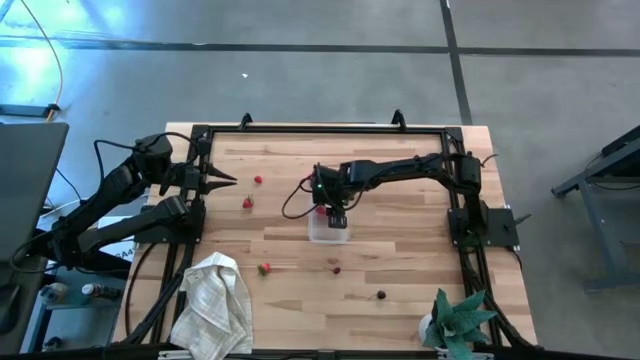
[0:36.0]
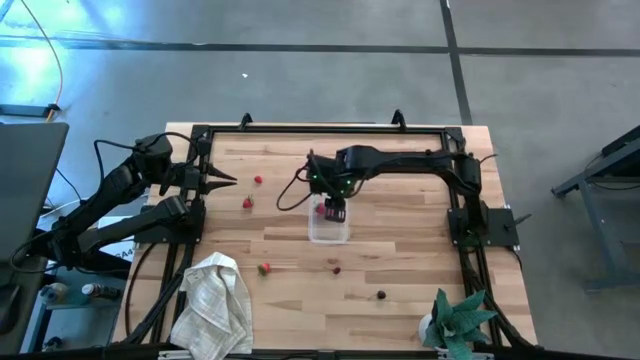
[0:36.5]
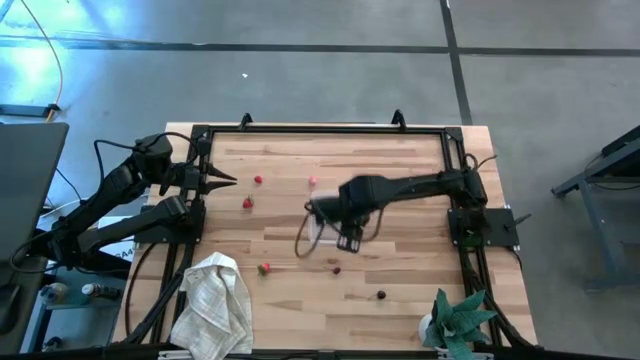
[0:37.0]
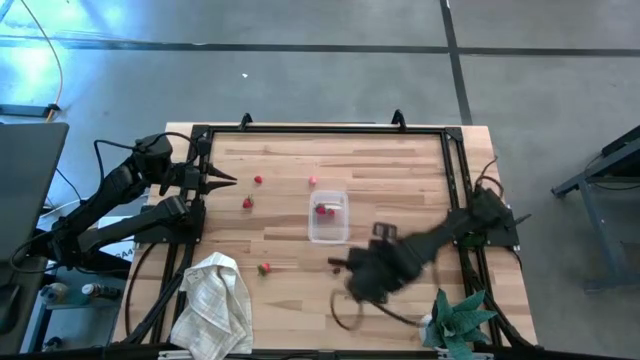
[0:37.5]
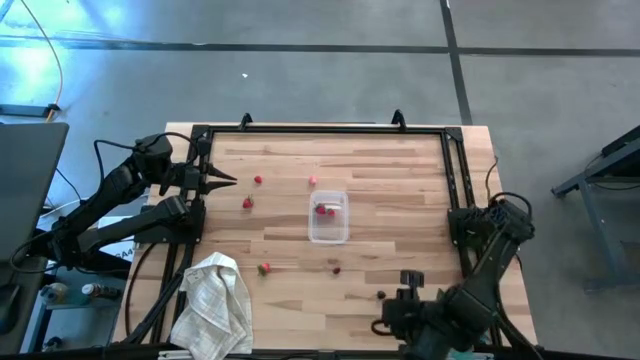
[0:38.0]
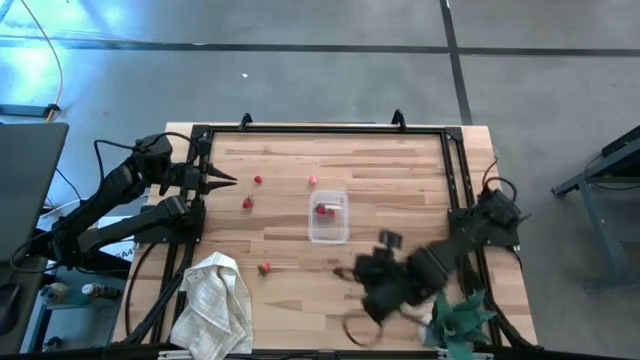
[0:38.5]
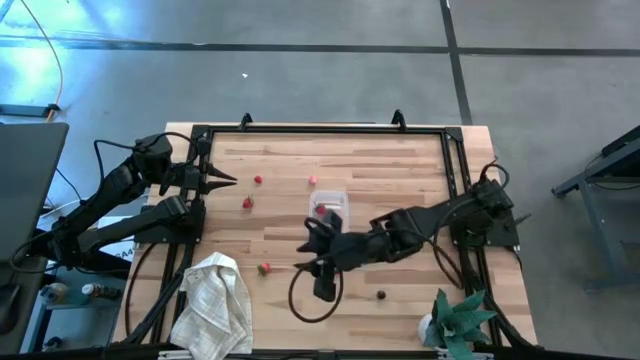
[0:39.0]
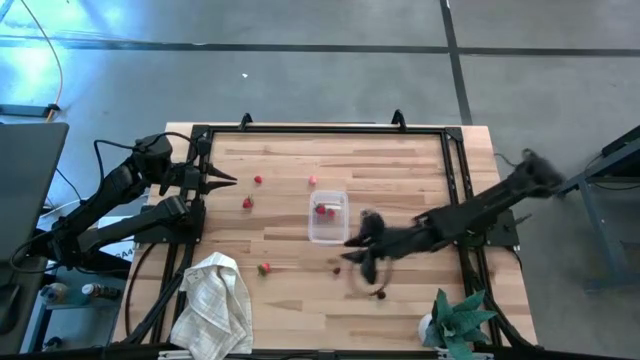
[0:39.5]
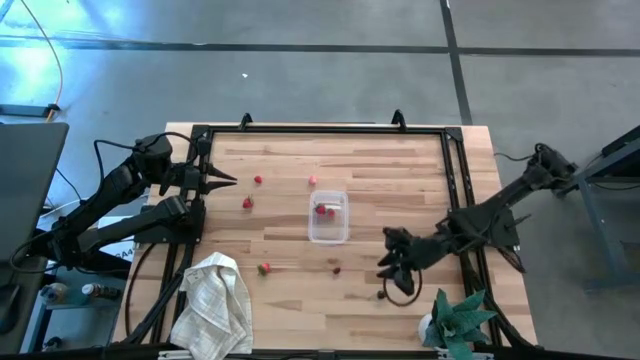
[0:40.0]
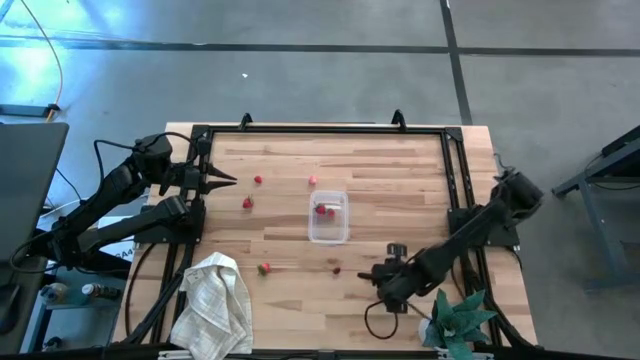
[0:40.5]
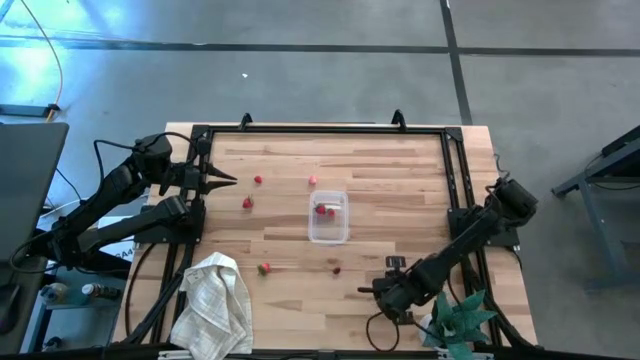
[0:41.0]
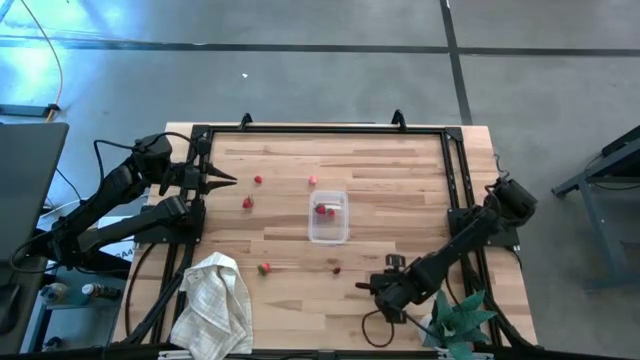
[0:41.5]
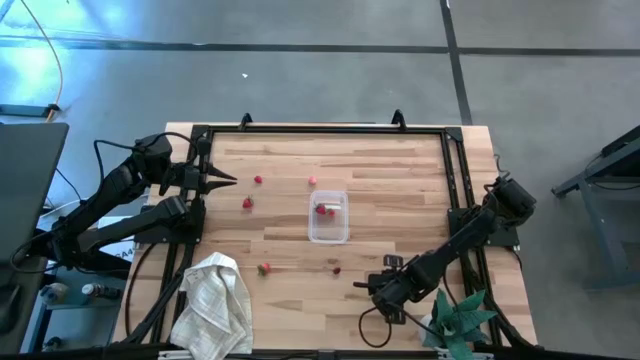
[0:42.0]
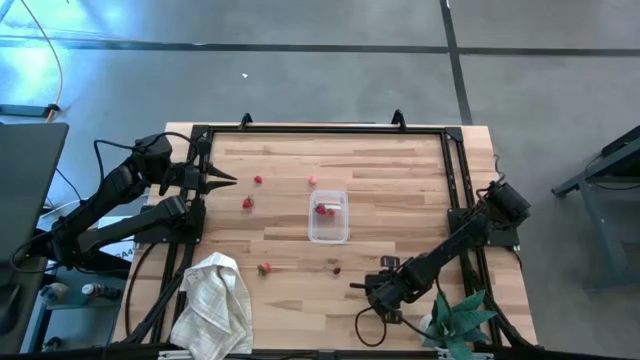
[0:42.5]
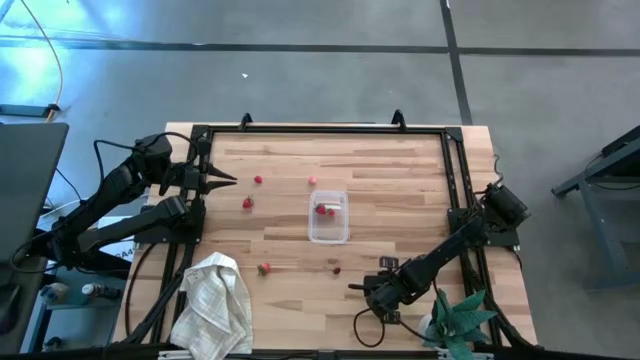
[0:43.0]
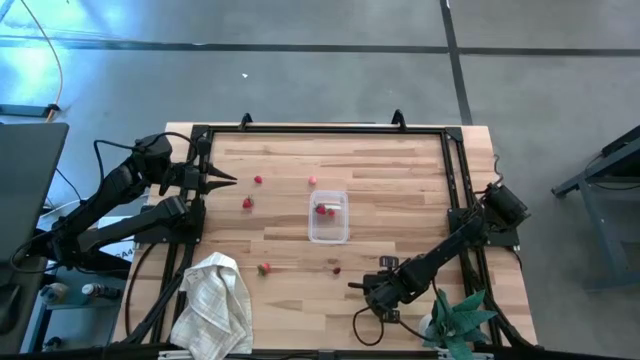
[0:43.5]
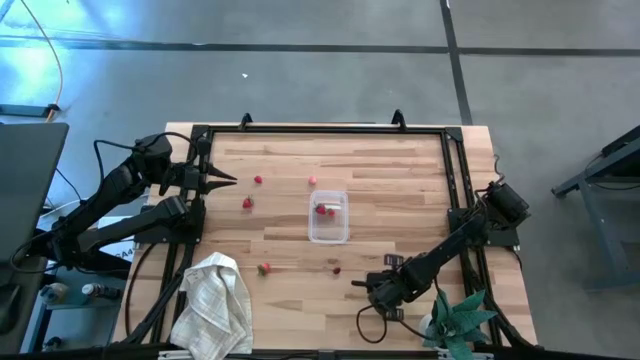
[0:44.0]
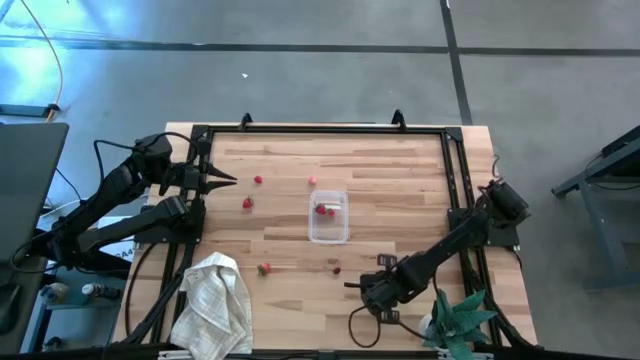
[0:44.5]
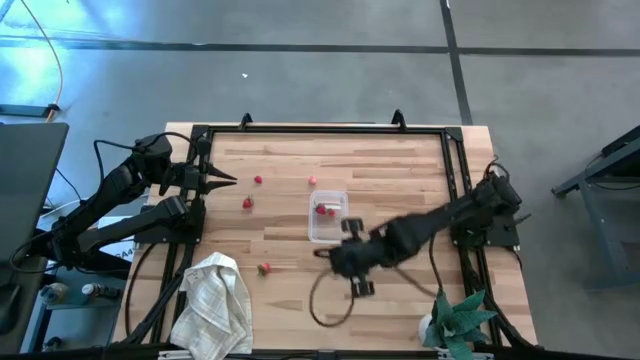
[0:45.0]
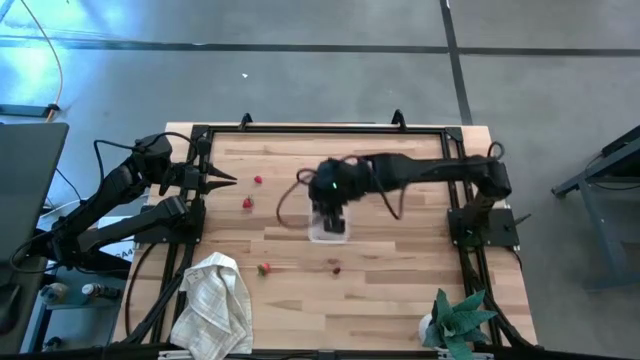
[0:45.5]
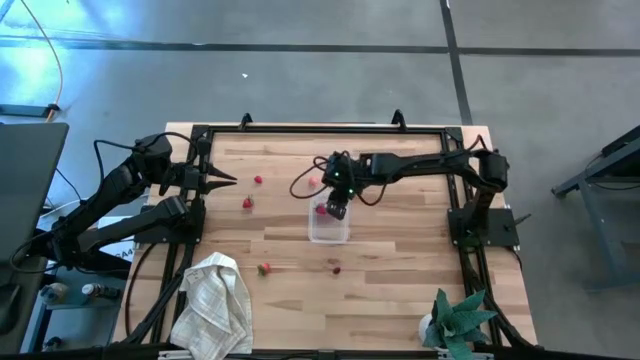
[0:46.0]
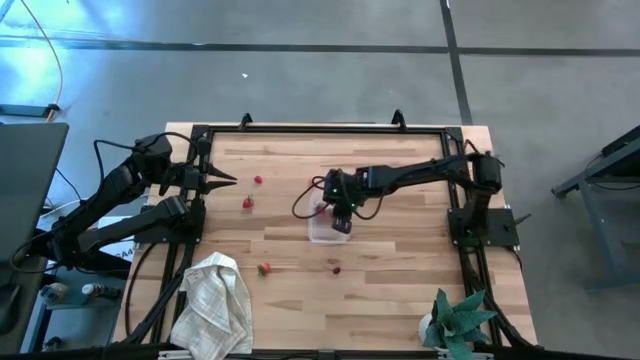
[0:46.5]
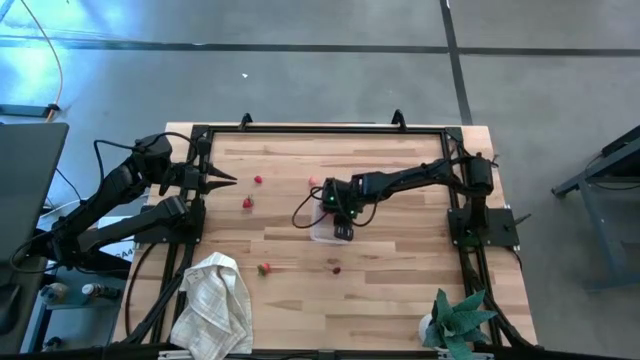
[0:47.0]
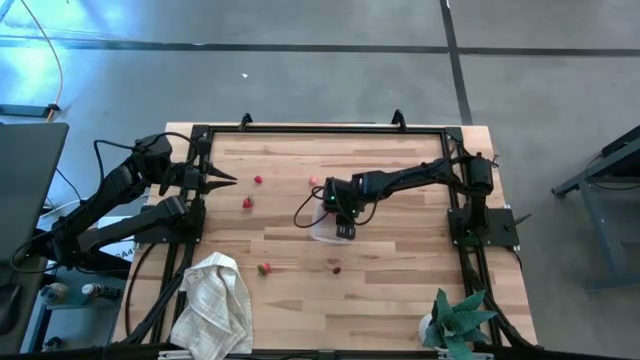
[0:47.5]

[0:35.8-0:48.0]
Task: Pick and placing Produce into tupperware
Put the black cherry into the transparent bin

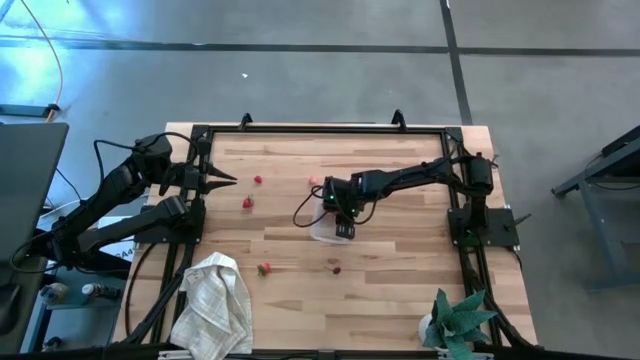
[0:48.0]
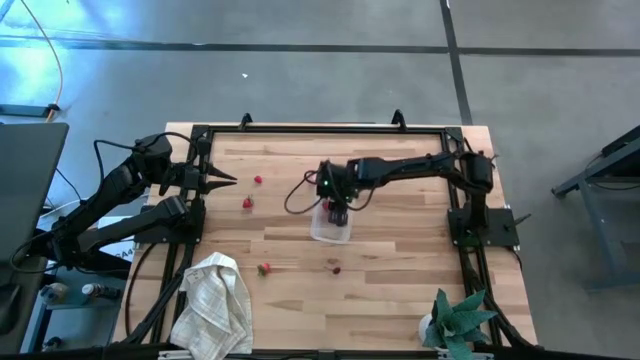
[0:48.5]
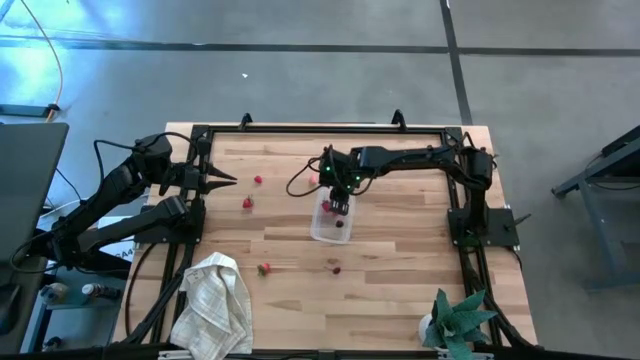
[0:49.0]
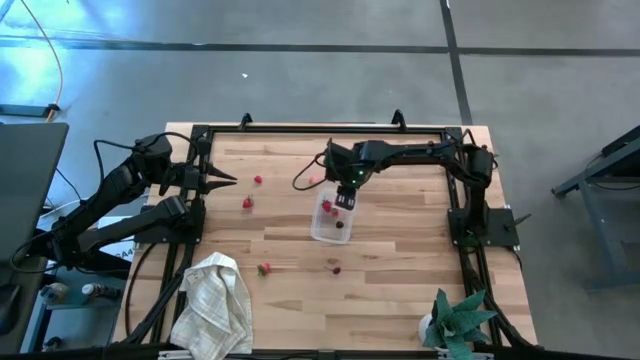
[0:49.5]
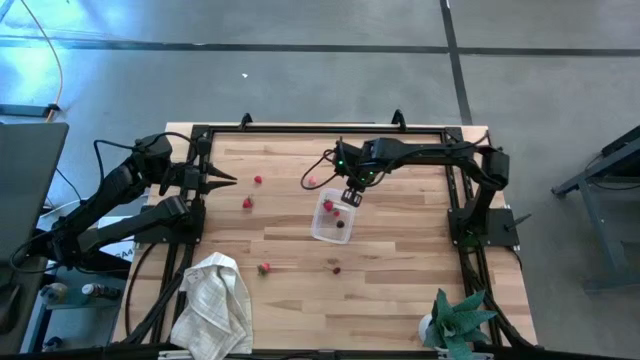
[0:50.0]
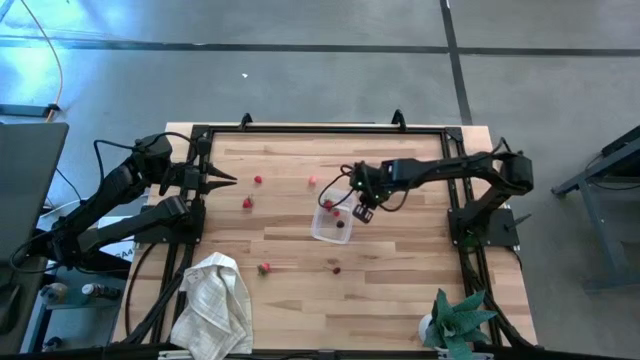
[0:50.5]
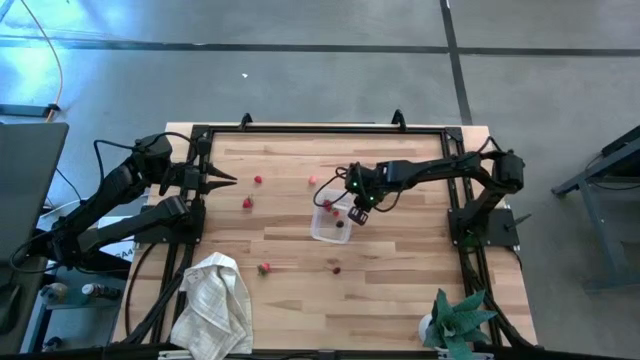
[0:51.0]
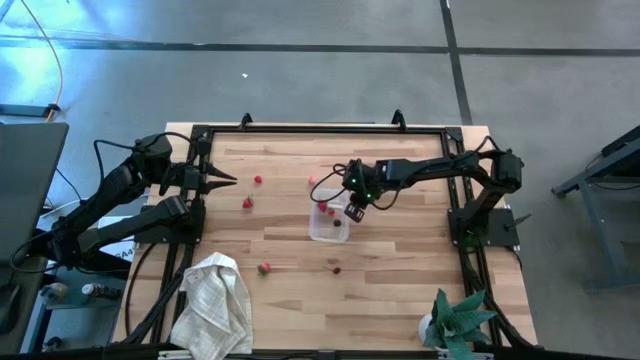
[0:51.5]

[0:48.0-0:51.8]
Adjust the transparent bin

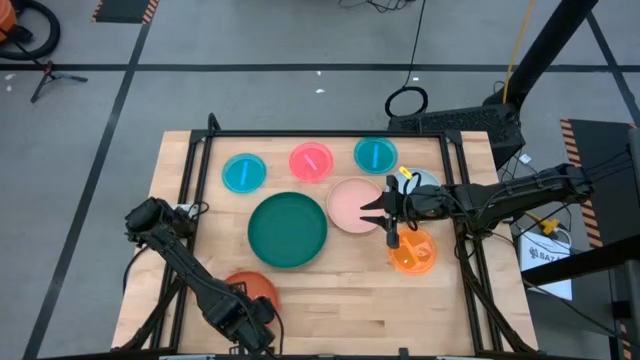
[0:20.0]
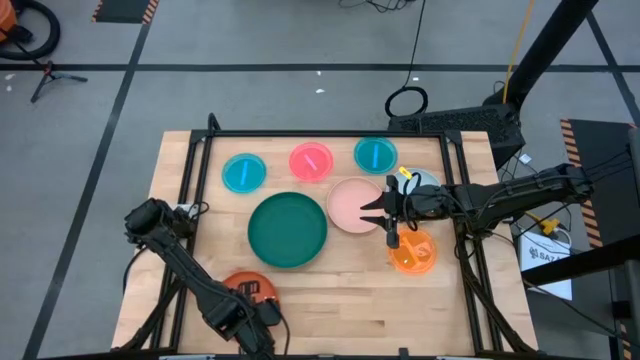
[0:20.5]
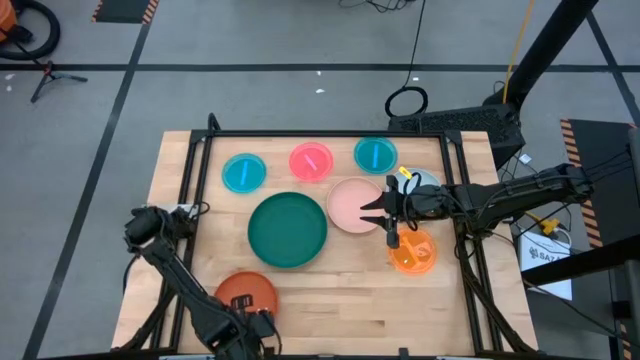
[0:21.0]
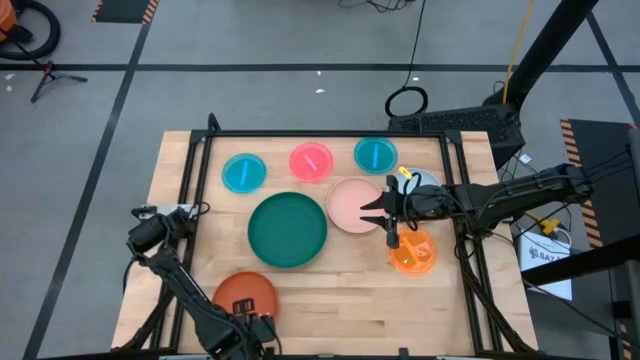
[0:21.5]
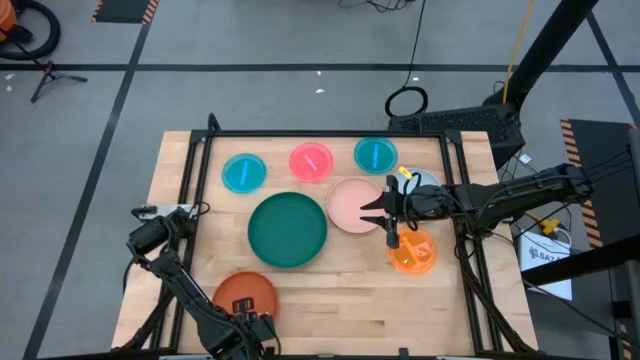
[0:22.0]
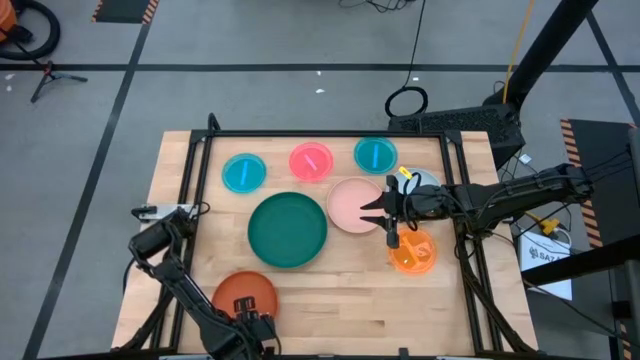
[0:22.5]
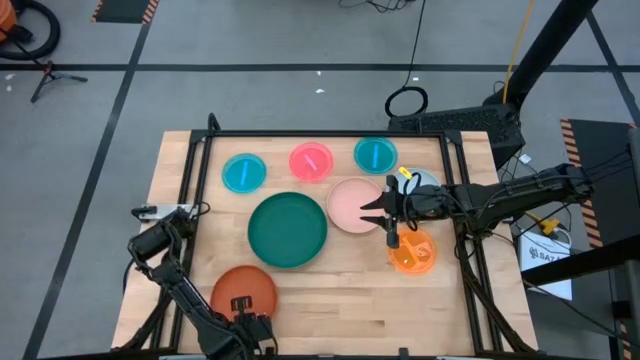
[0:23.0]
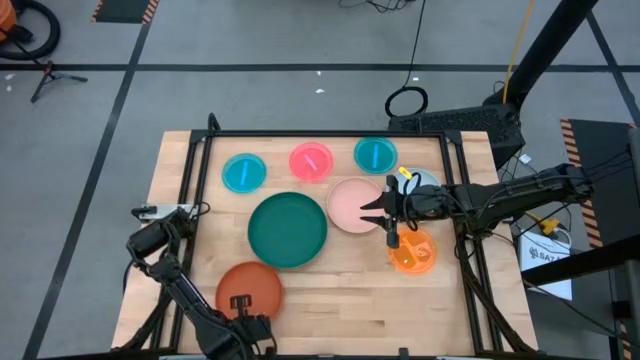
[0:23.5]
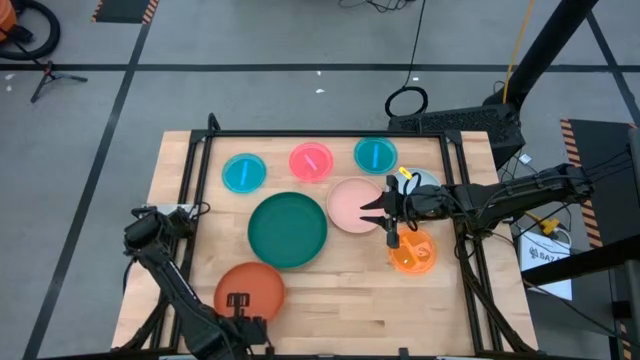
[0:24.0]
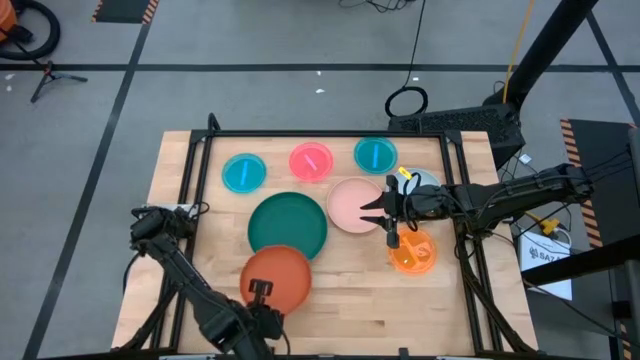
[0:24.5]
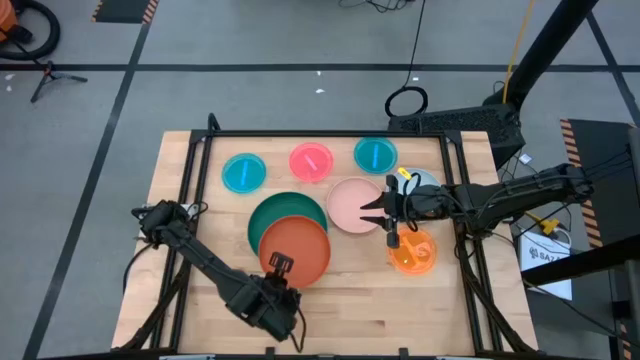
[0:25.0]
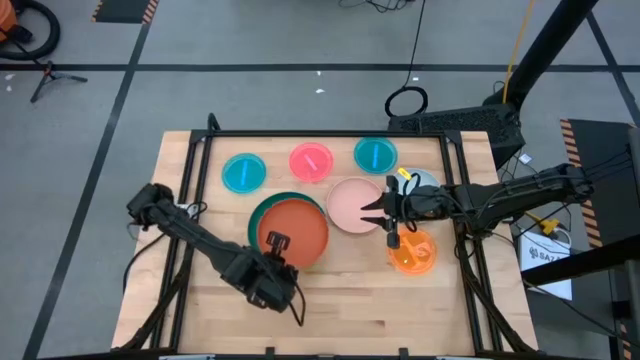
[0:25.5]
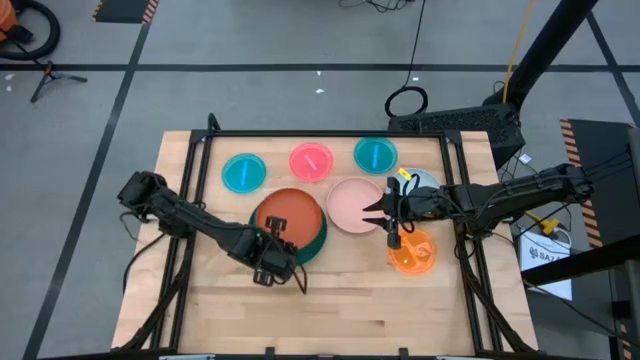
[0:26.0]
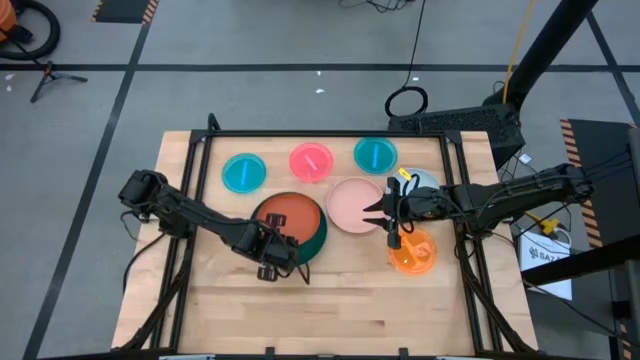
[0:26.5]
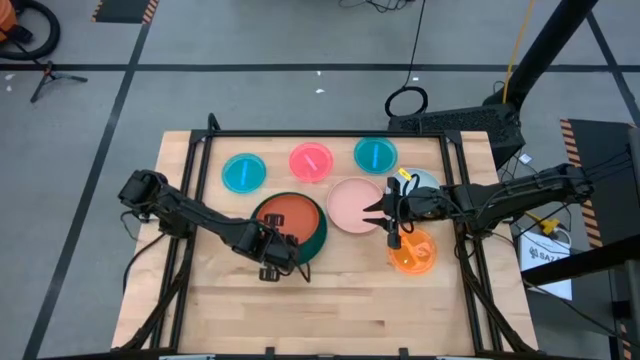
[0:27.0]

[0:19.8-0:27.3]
Task: Stack plastic plates
Stack the orange plate on top of the dark green plate
